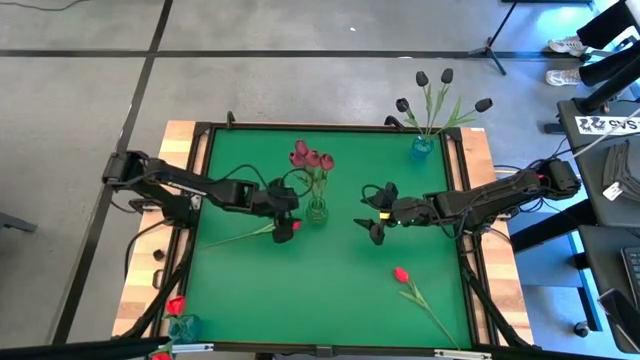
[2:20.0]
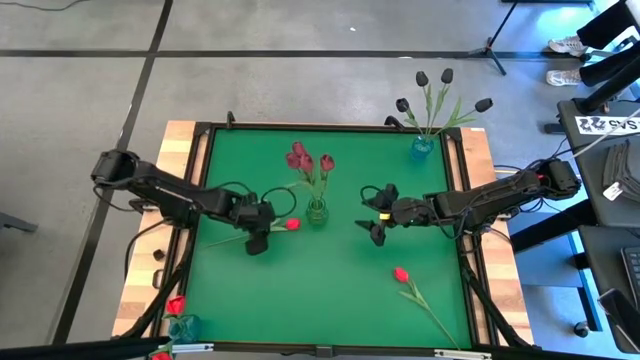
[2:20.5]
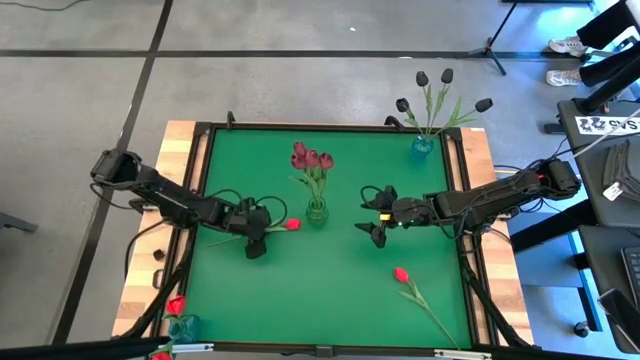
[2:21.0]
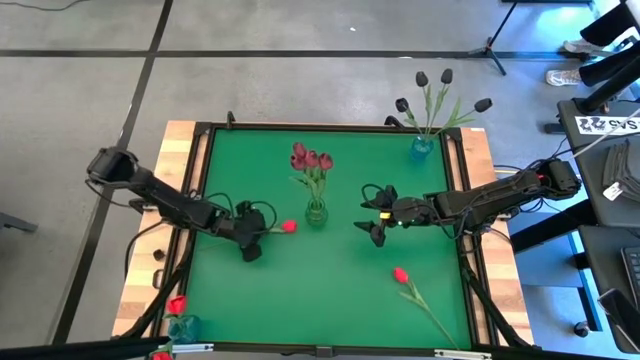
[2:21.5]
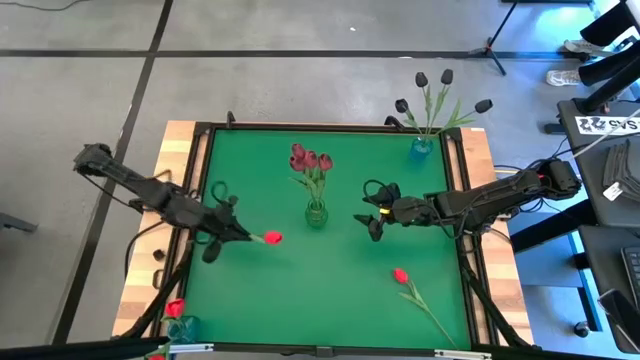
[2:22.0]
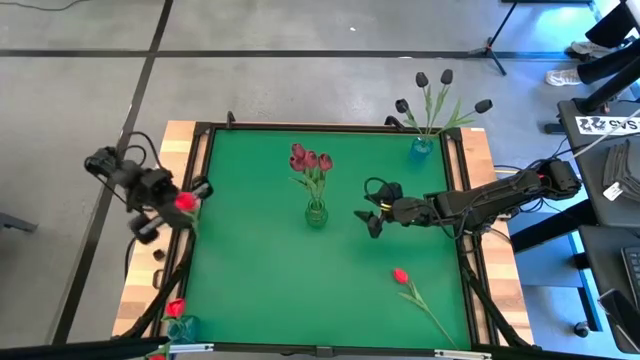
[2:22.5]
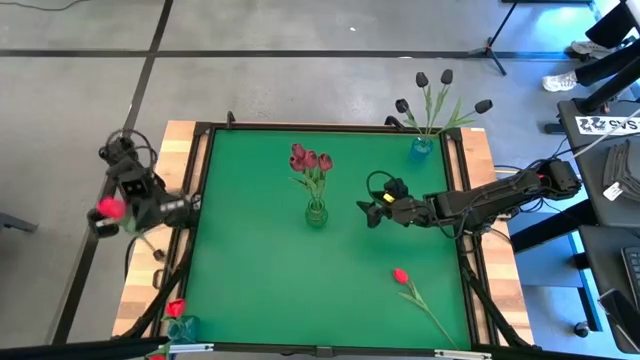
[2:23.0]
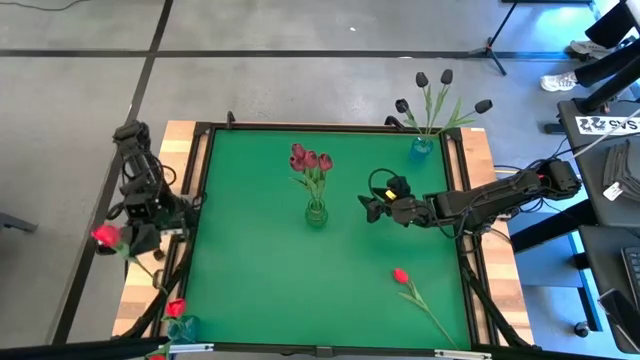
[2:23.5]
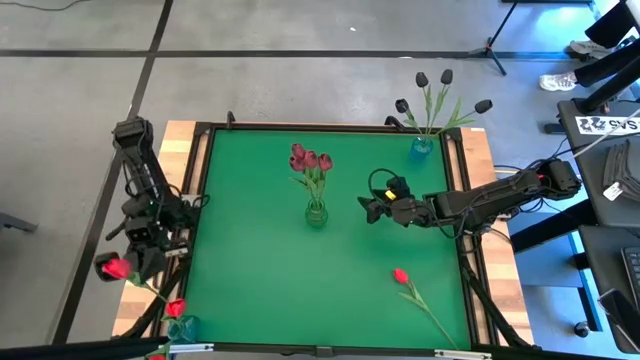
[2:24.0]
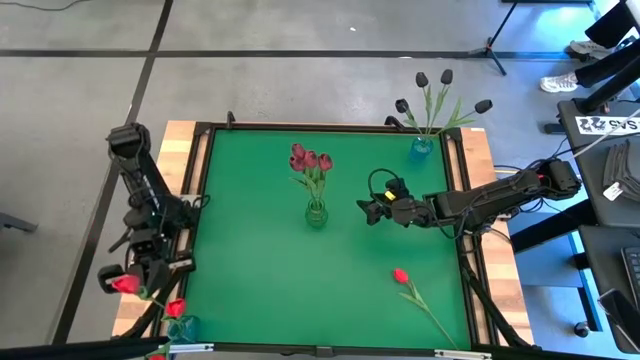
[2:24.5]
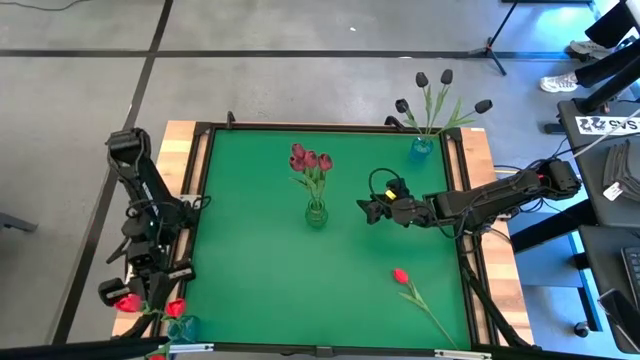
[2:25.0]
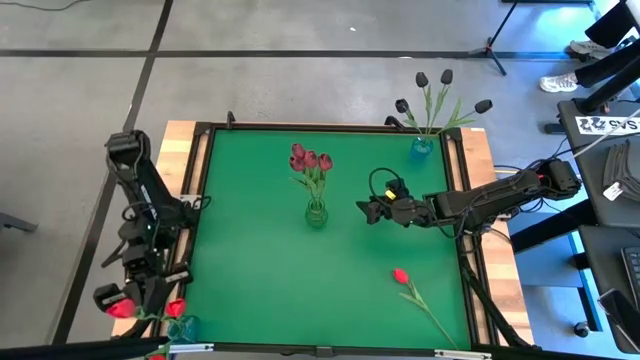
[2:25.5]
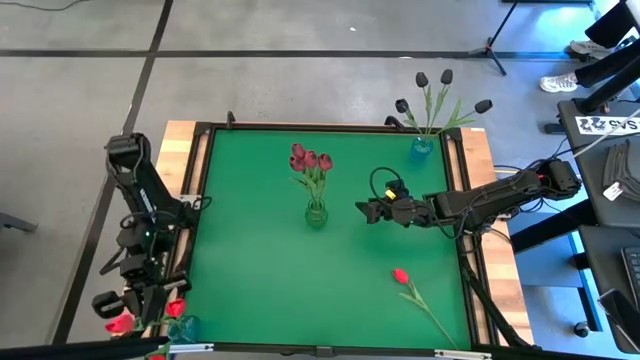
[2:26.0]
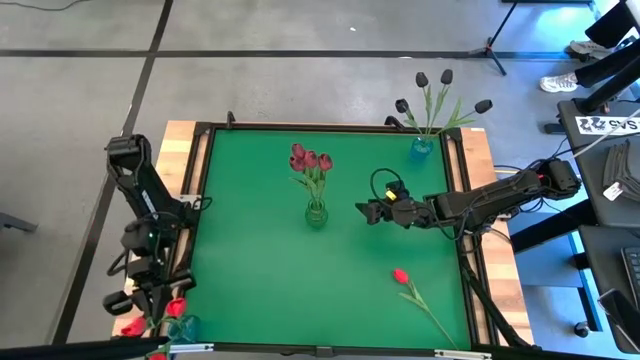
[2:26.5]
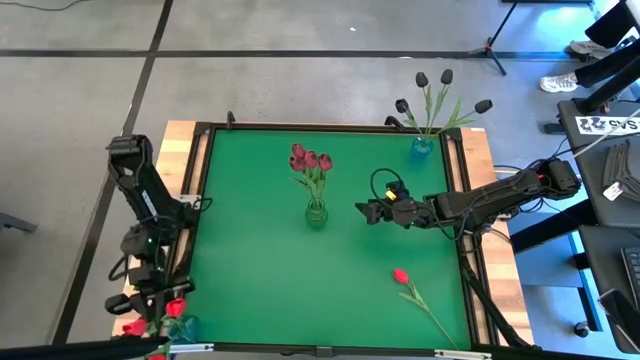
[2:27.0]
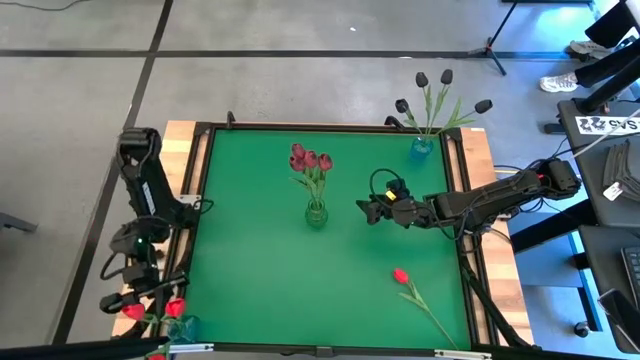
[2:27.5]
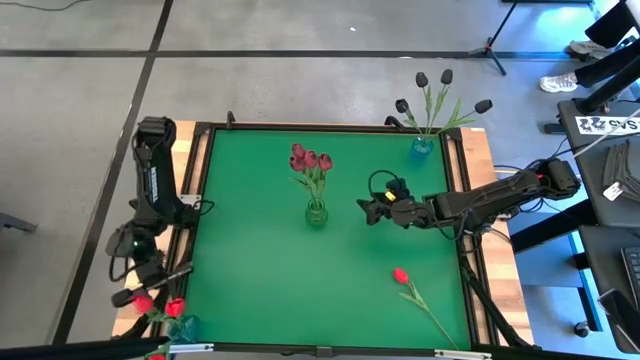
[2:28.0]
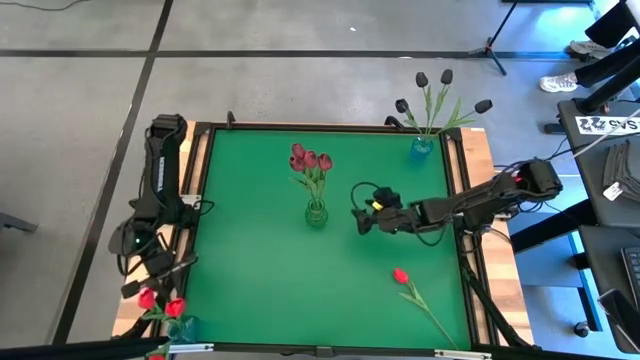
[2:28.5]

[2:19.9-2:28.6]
Task: Sort flowers into vase by color
Put the left red flower into the bottom left blue vase

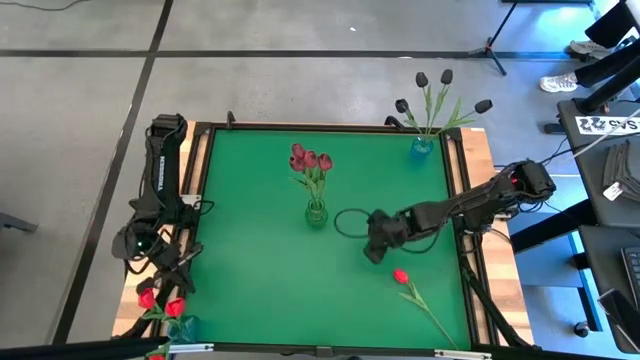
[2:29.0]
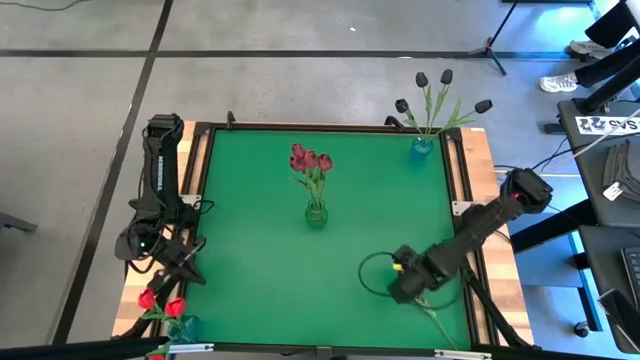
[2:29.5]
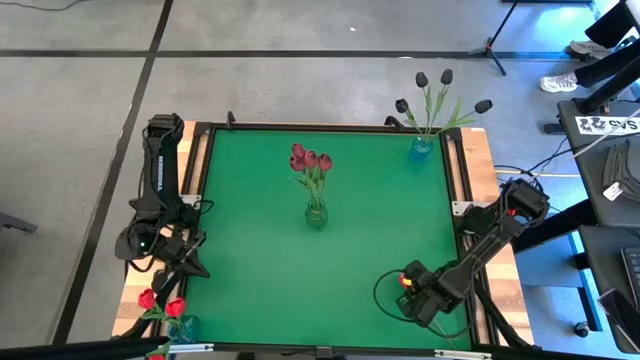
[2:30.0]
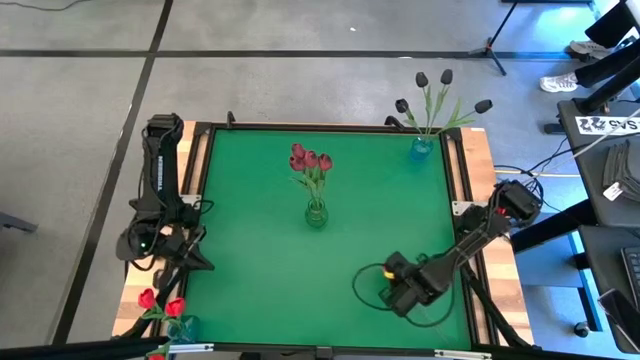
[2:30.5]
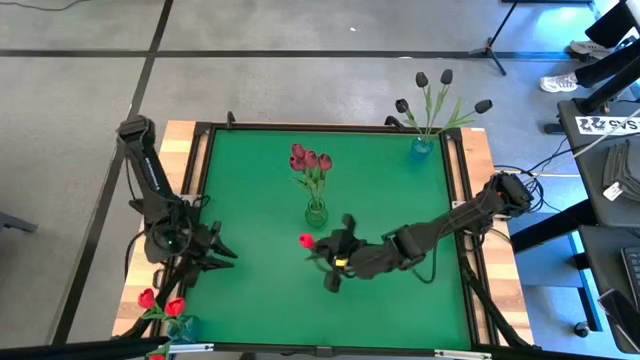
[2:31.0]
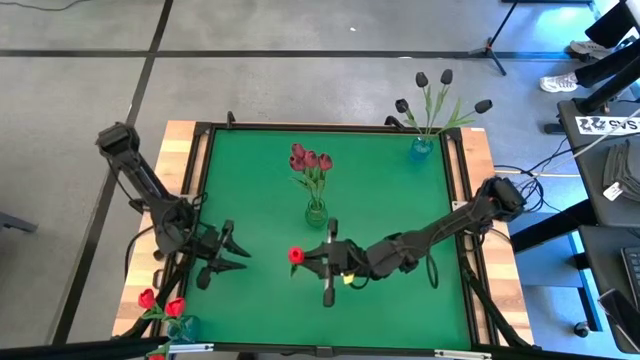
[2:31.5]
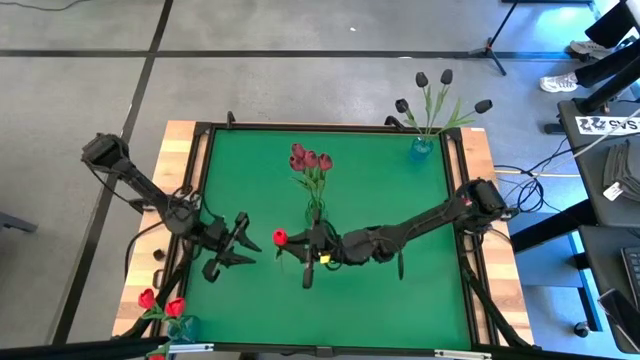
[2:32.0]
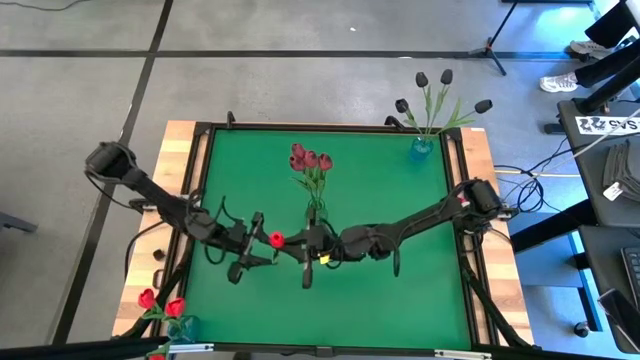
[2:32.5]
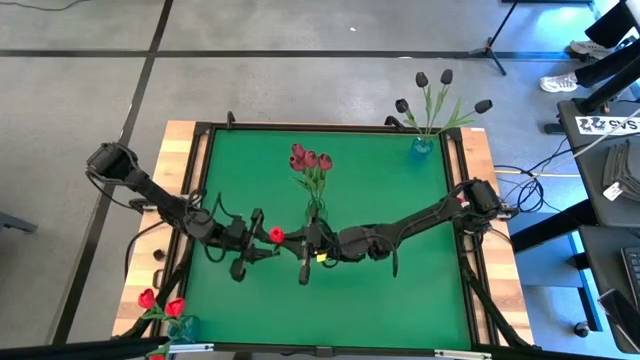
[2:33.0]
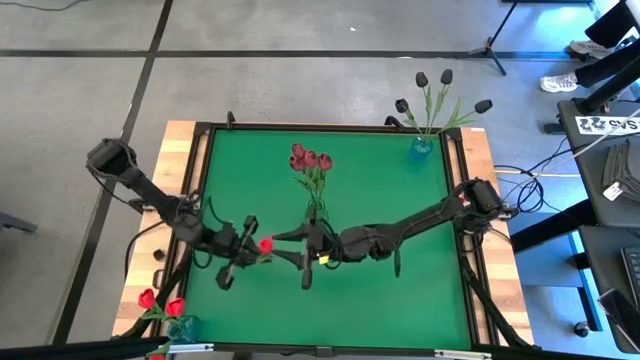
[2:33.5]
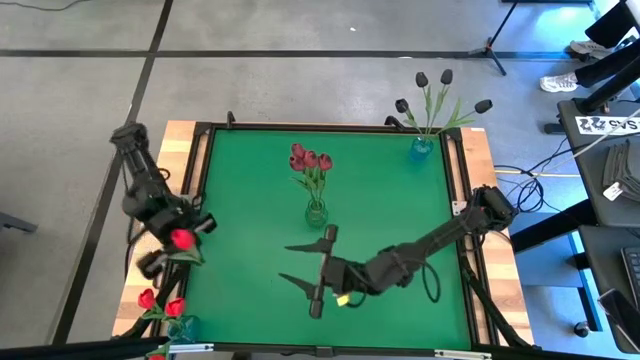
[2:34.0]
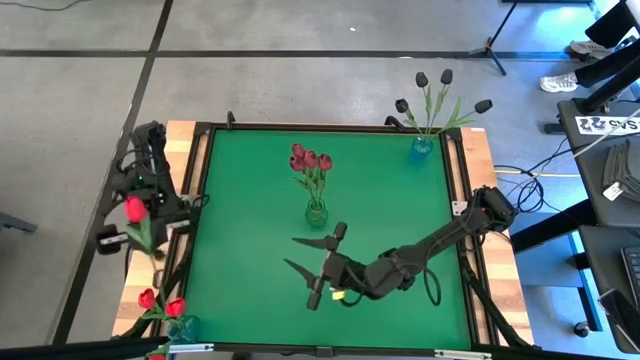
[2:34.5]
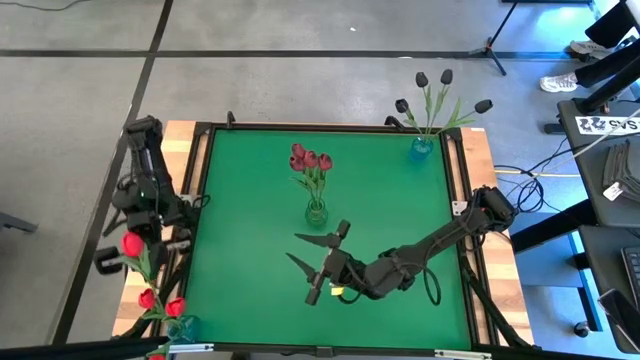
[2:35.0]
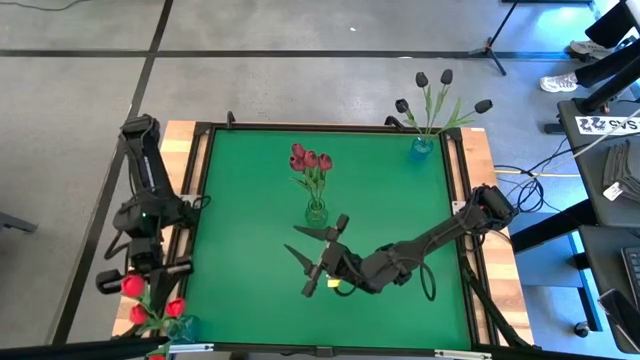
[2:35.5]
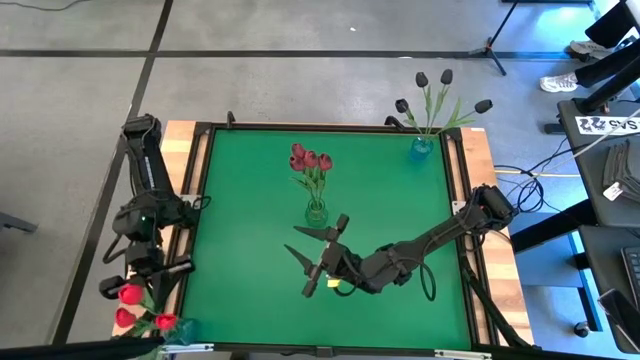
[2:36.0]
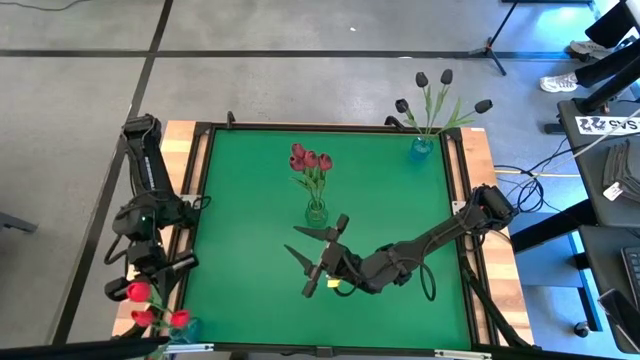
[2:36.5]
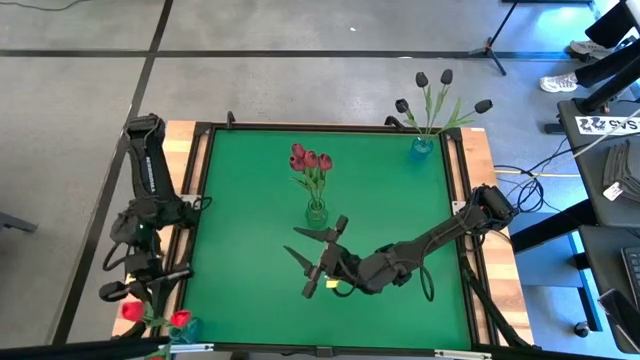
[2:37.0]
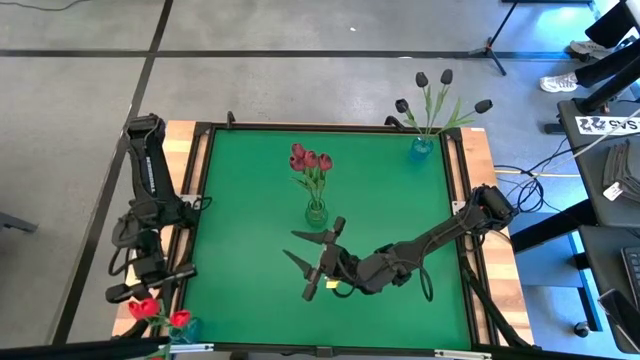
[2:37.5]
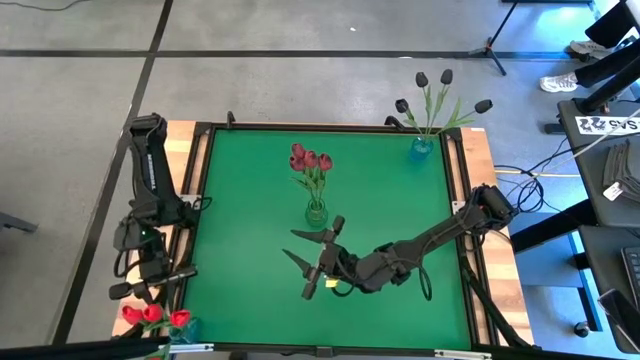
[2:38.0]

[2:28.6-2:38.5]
Put the red flower into the bottom left blue vase

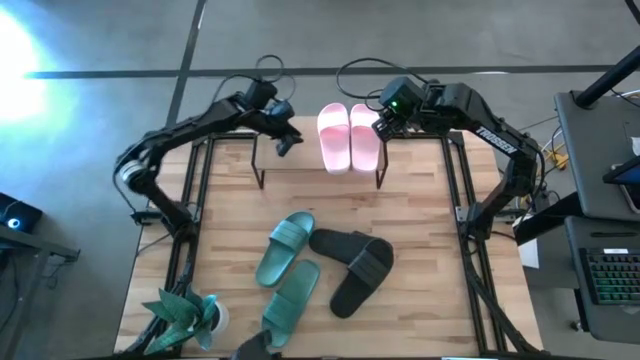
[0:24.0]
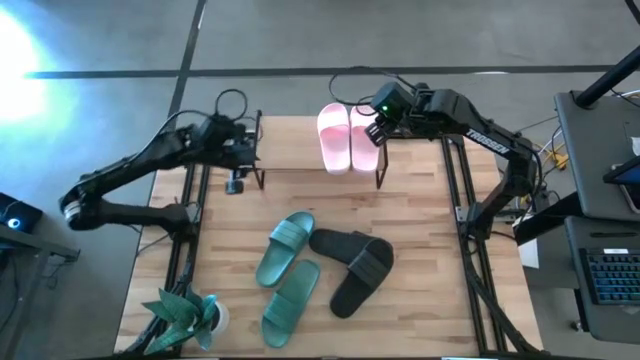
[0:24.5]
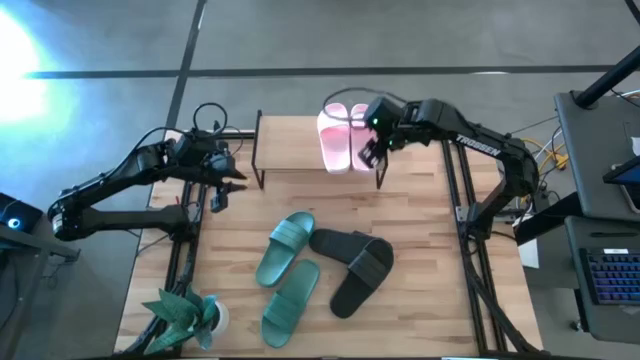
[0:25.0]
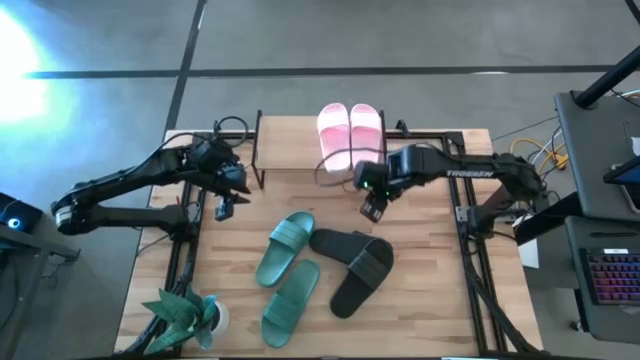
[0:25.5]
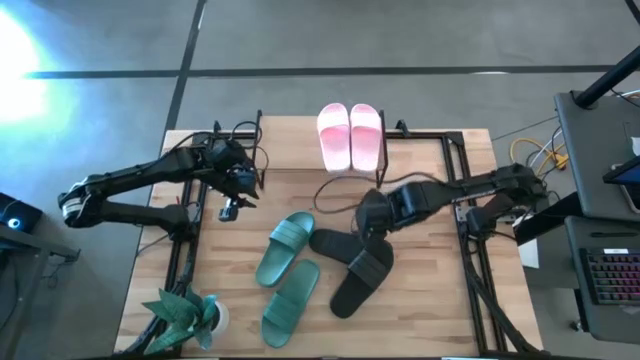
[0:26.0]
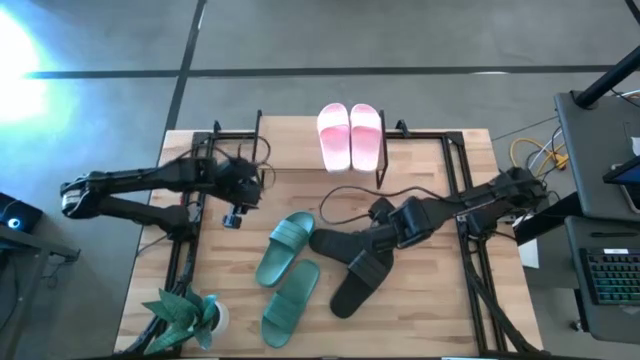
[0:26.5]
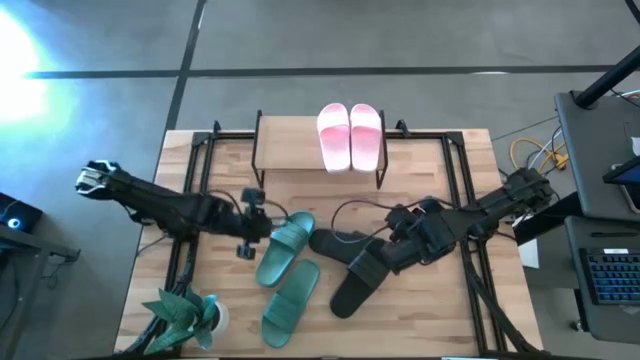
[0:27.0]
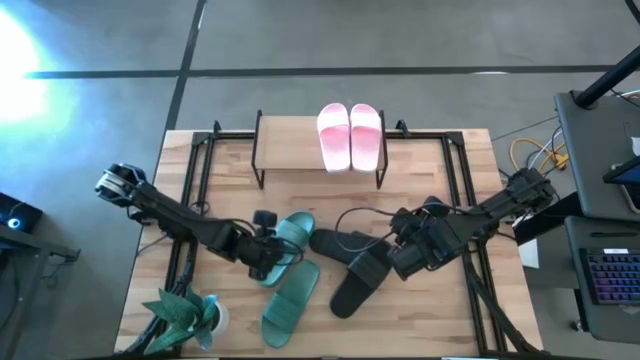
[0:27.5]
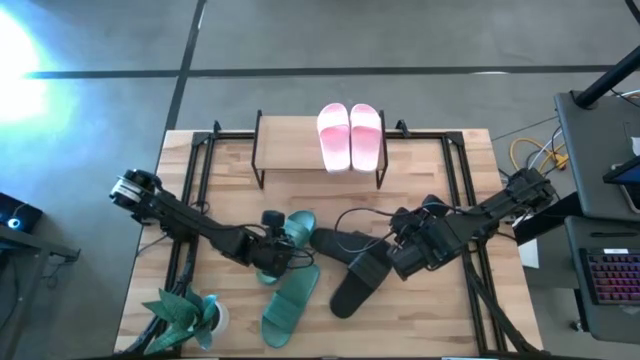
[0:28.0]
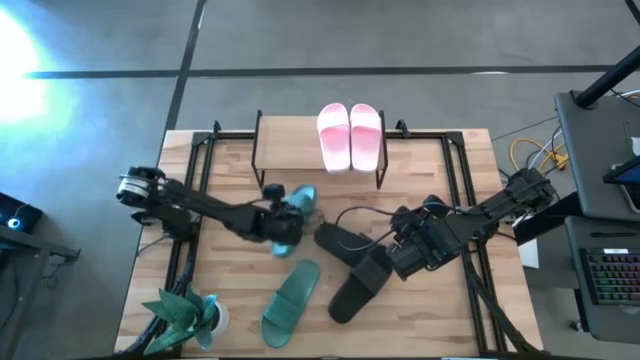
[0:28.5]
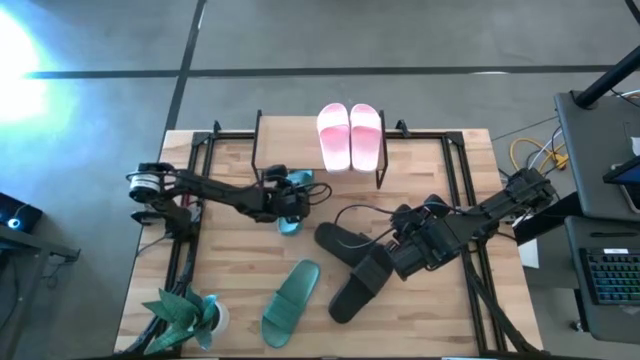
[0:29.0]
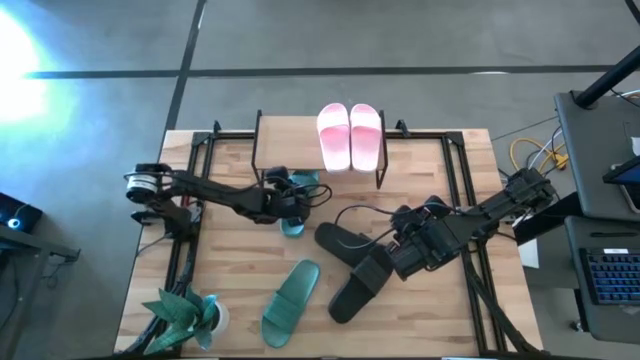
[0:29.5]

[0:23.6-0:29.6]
Task: Pick and place slides into the shelf
Put the top green slipper under the shelf
